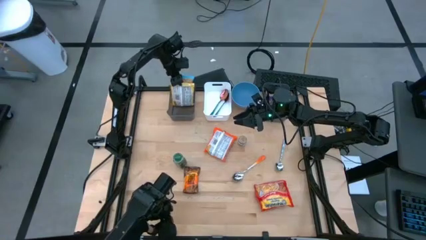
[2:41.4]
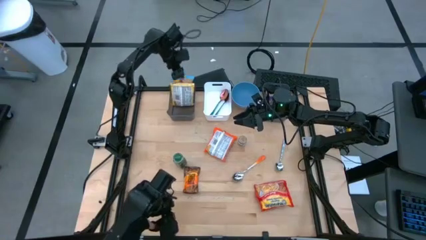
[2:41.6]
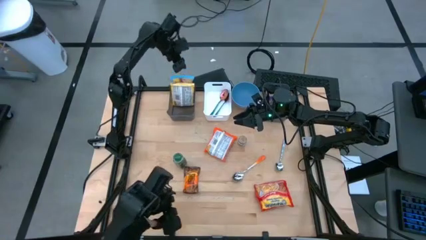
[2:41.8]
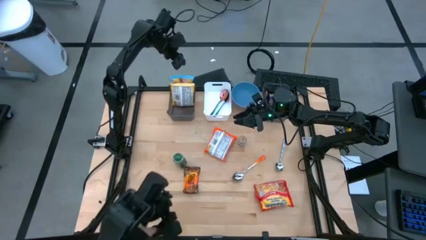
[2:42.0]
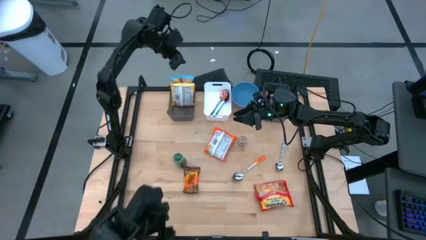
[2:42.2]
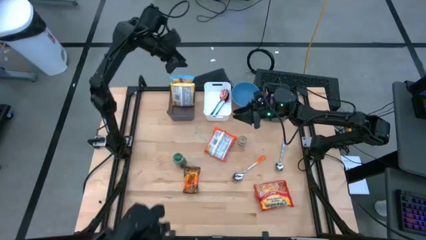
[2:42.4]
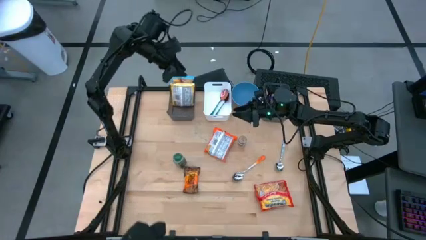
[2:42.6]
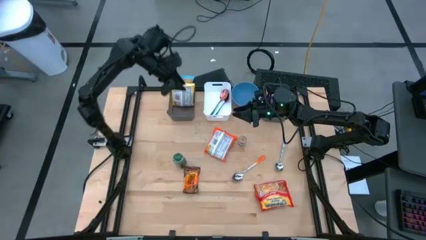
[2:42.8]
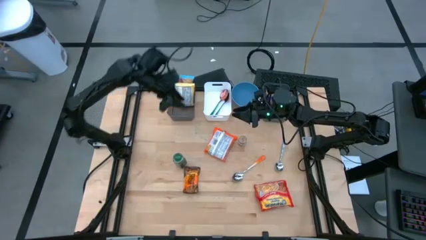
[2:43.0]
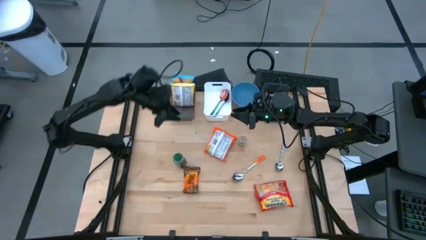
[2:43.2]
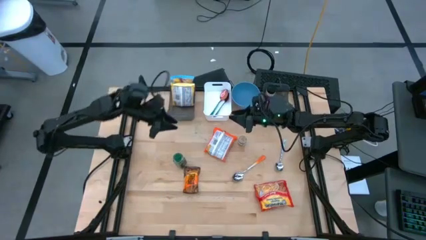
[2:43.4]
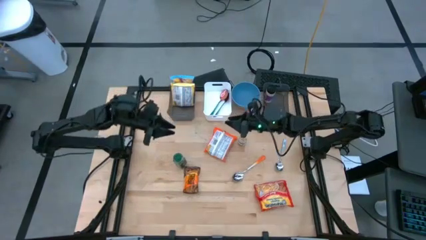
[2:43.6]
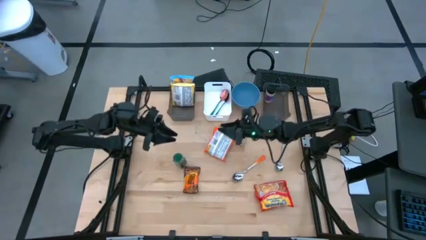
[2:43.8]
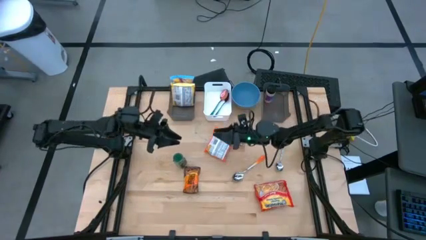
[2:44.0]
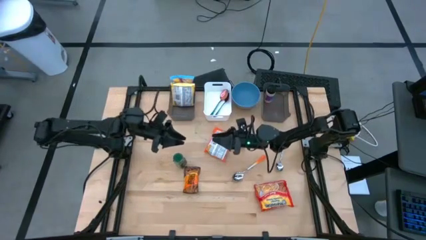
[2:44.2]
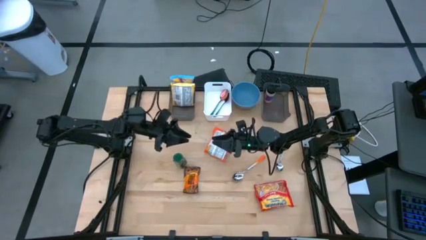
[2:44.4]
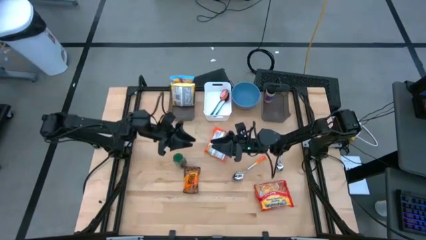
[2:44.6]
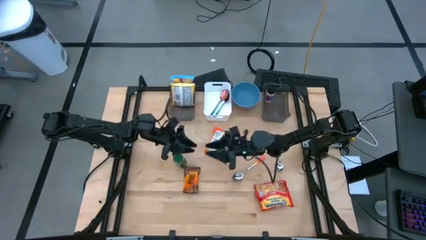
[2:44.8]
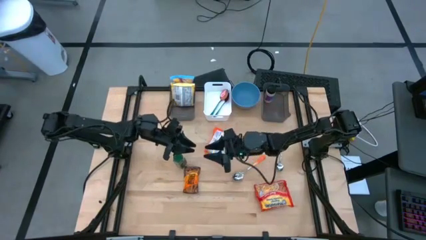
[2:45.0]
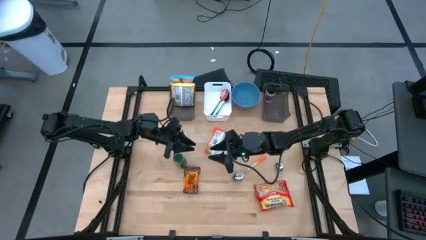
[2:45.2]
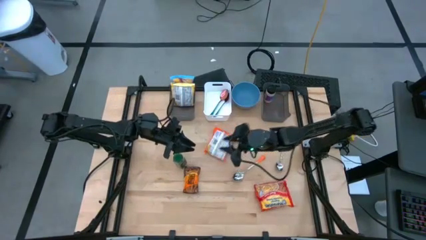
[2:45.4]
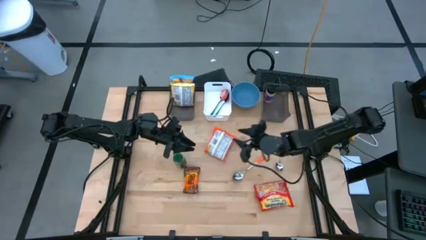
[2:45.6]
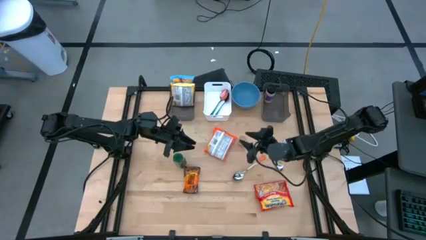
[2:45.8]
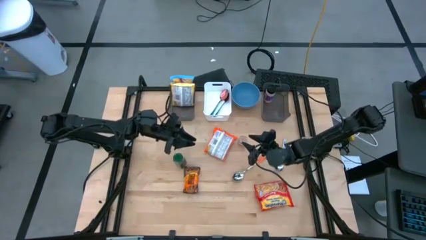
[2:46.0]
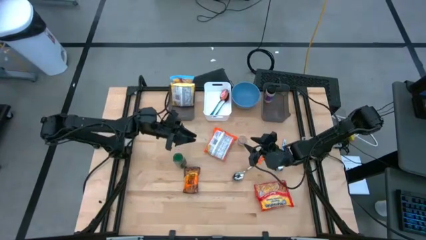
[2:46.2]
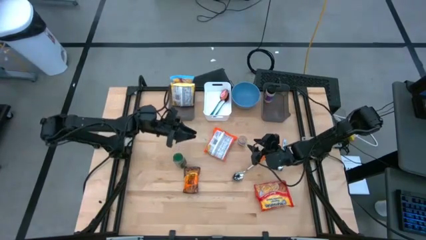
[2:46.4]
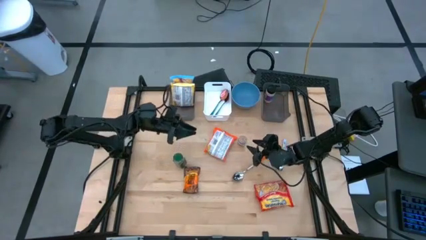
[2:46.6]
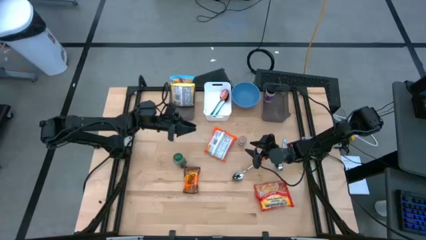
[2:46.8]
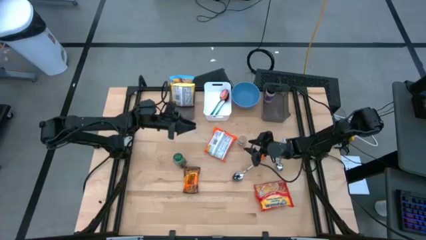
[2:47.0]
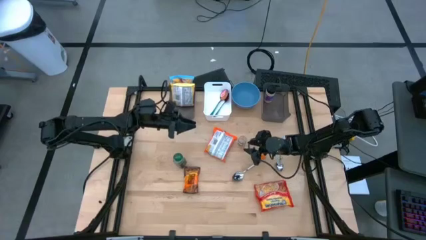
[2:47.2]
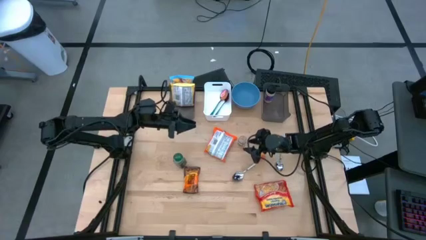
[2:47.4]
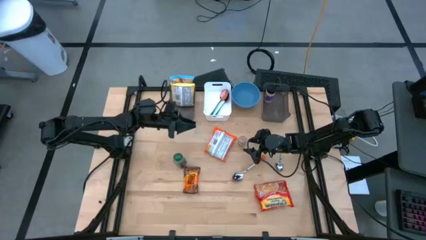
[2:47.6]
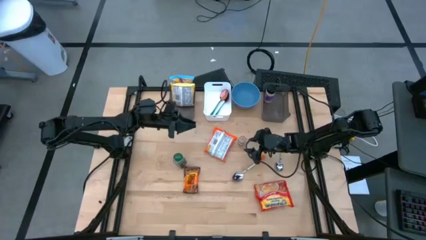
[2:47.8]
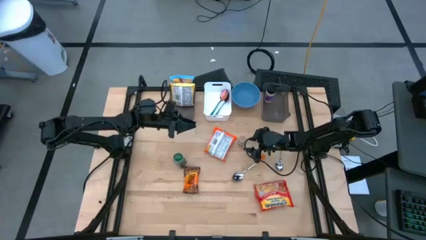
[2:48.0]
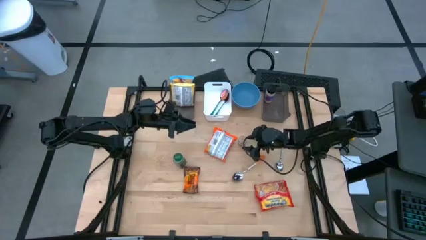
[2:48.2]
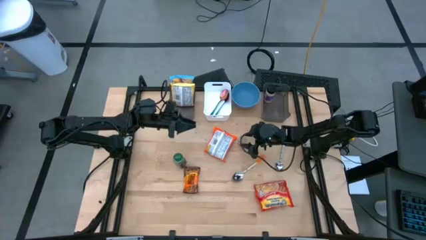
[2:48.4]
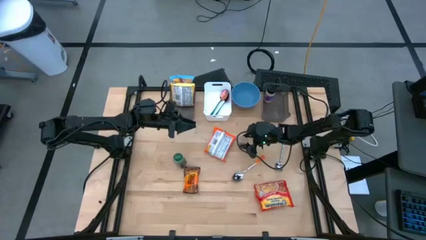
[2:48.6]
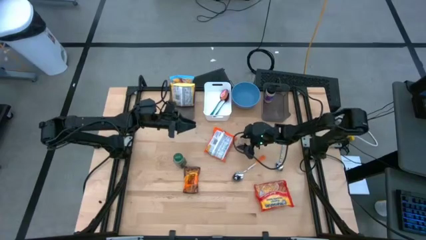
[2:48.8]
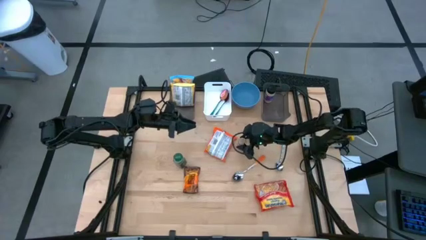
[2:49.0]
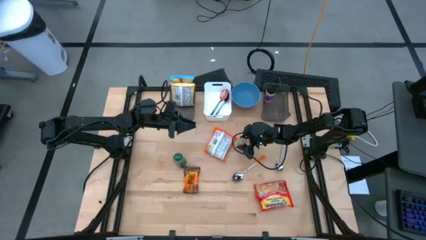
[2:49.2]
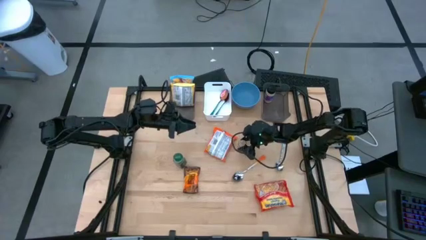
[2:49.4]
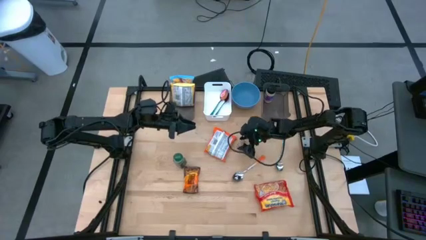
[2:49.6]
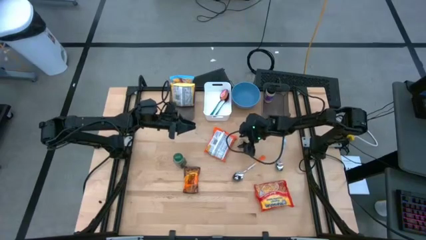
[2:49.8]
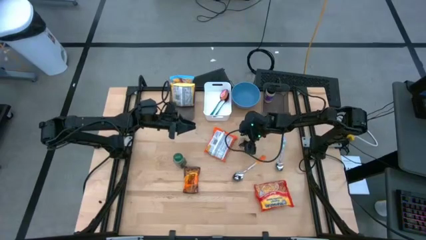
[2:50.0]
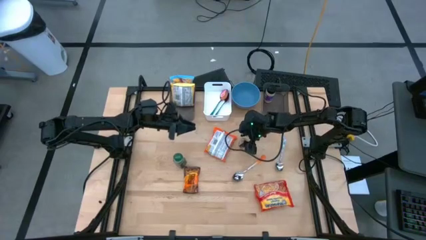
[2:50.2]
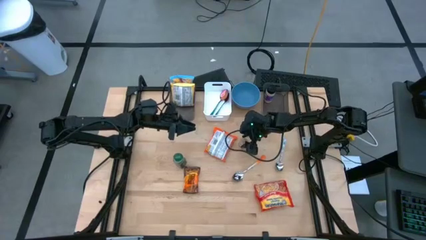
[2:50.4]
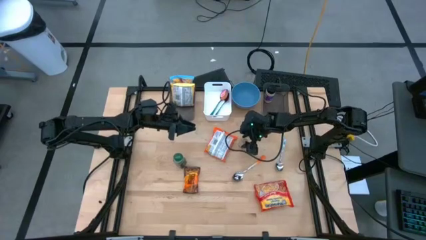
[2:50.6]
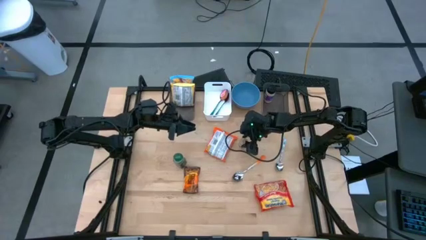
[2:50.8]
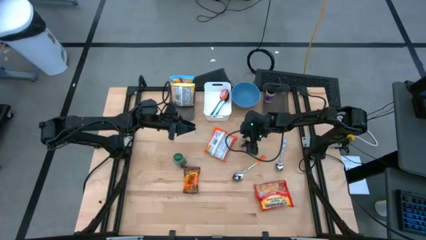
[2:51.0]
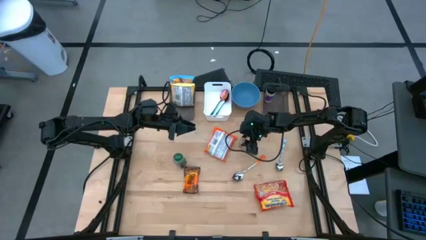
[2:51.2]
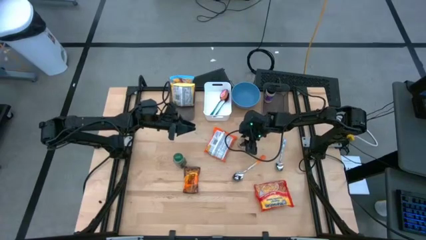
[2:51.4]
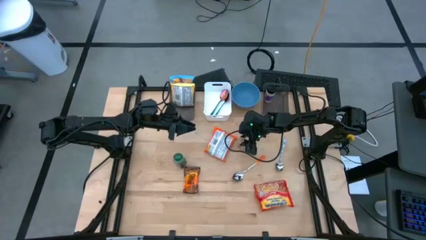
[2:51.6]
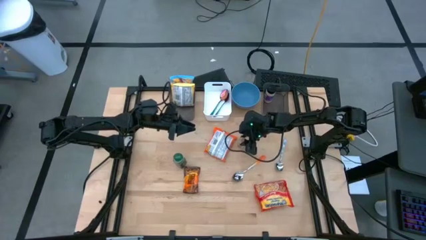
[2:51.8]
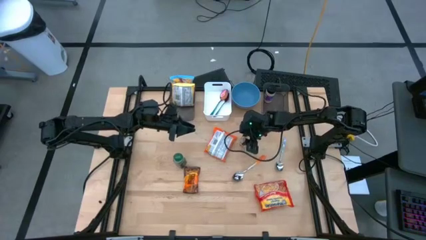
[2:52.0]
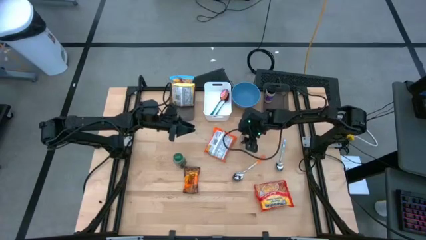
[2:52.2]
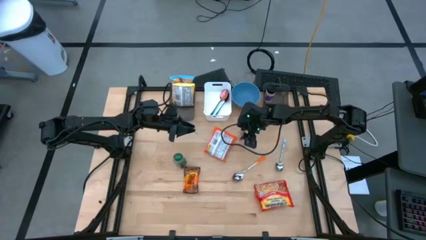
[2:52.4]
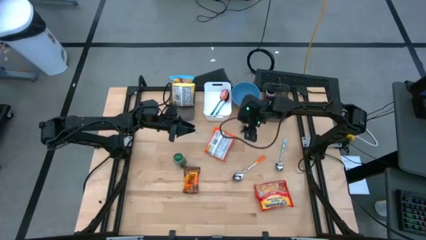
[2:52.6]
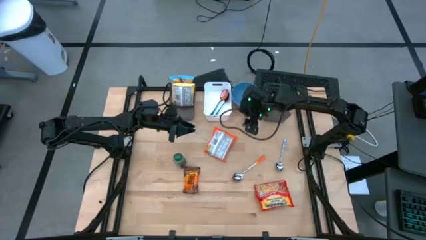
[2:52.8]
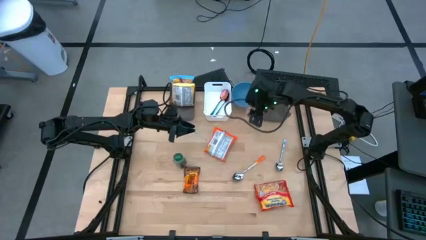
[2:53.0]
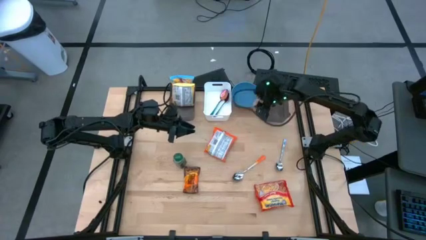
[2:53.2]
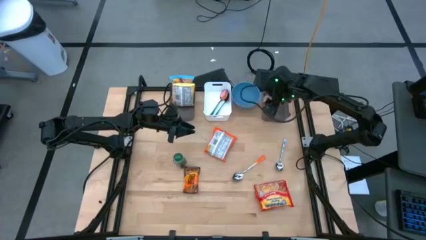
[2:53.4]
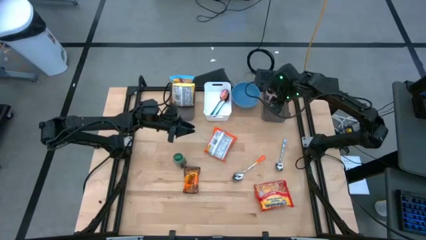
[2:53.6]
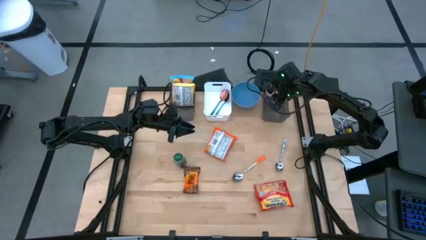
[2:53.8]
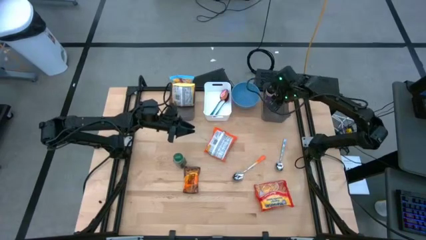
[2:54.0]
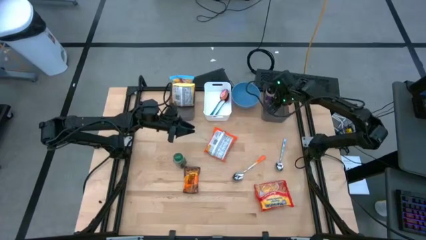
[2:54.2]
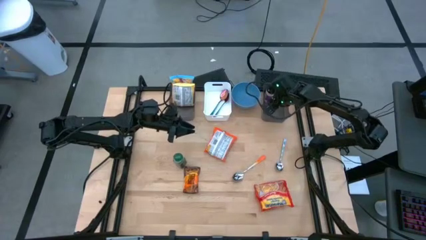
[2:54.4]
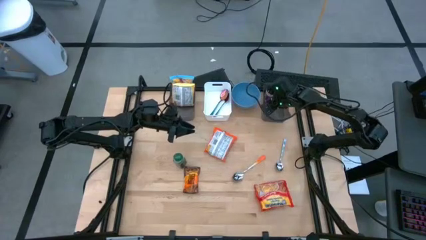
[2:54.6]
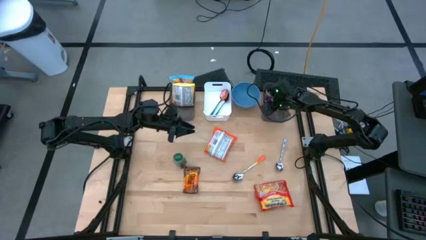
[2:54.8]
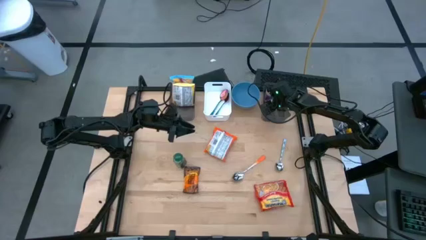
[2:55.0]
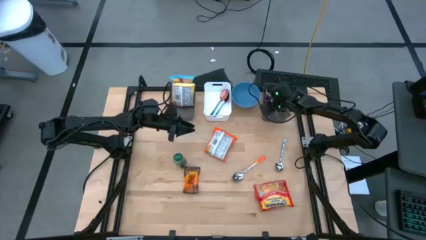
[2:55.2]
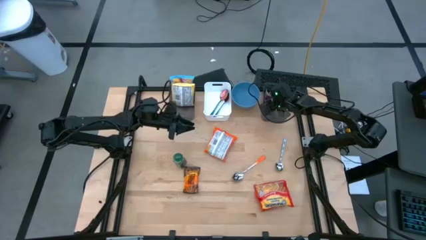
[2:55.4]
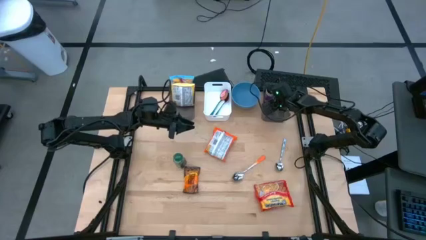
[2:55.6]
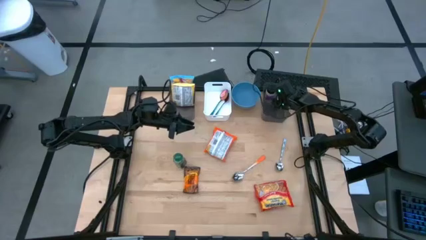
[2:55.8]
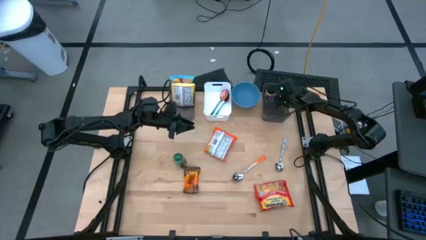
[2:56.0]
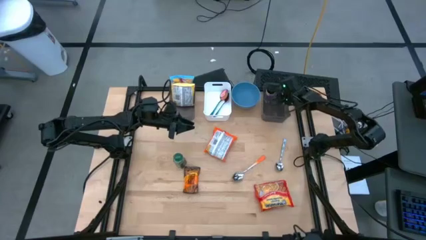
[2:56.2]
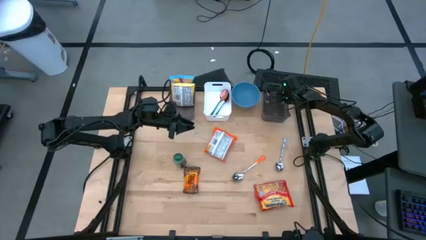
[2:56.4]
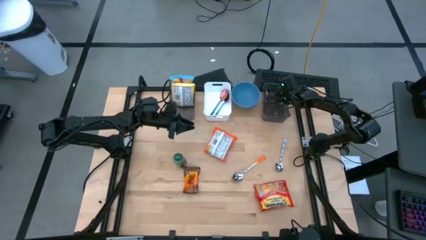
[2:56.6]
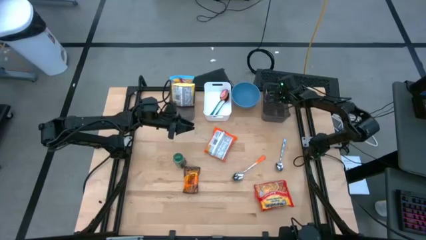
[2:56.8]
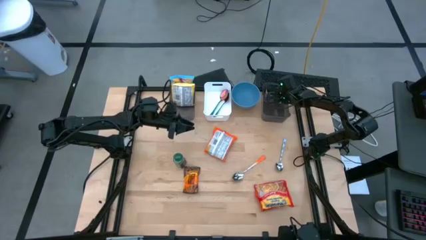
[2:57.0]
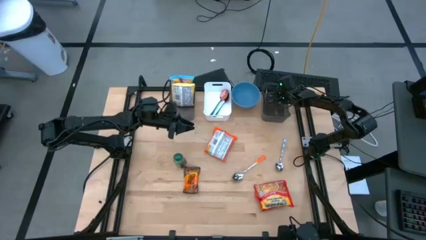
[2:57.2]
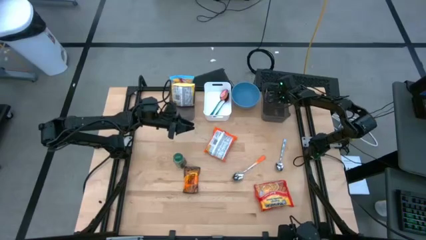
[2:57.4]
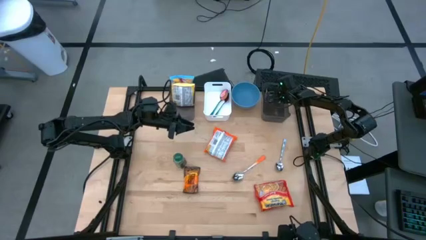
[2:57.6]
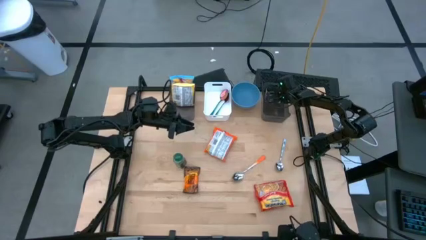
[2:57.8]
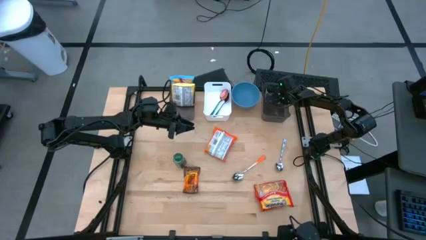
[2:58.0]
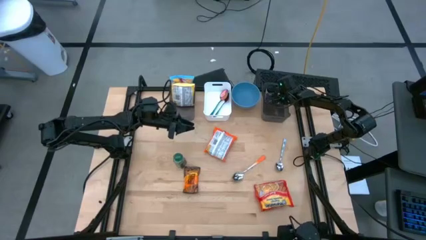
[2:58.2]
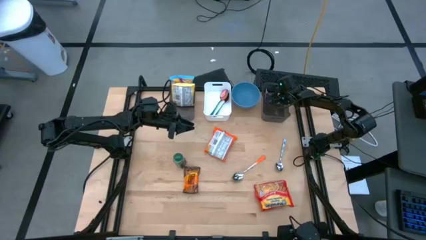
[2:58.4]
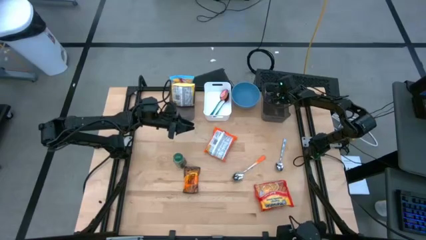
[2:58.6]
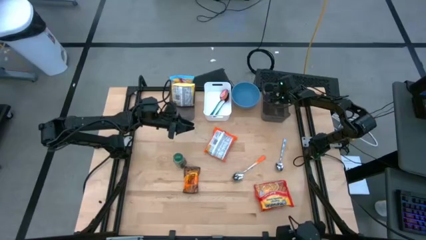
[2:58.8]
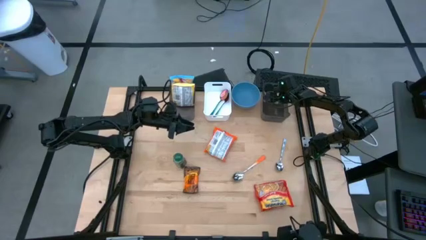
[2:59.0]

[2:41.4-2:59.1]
Task: Pick & Place Food Item
Put the brown spice bottle into the right black bin
